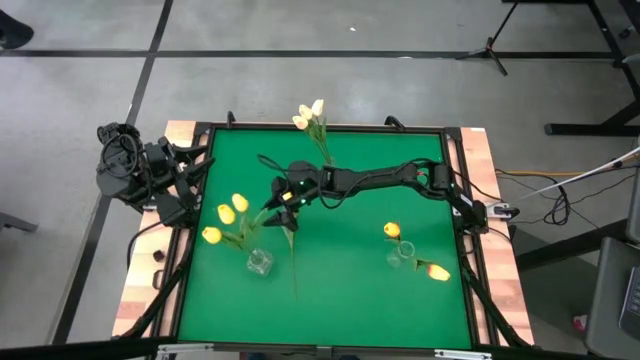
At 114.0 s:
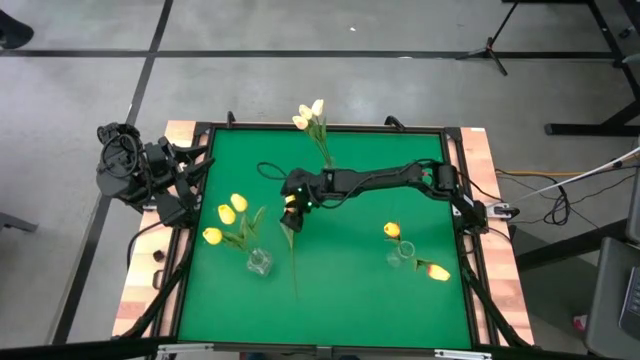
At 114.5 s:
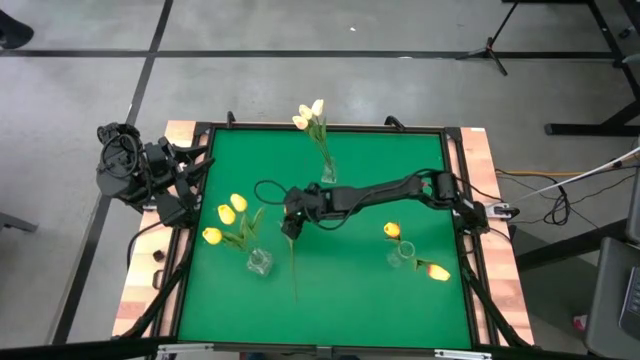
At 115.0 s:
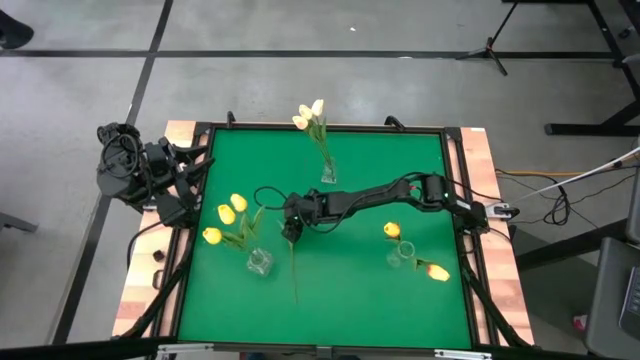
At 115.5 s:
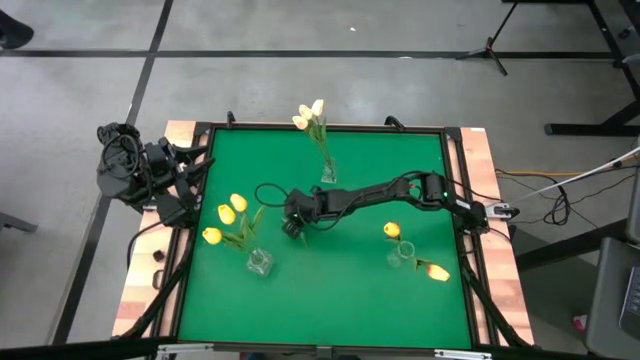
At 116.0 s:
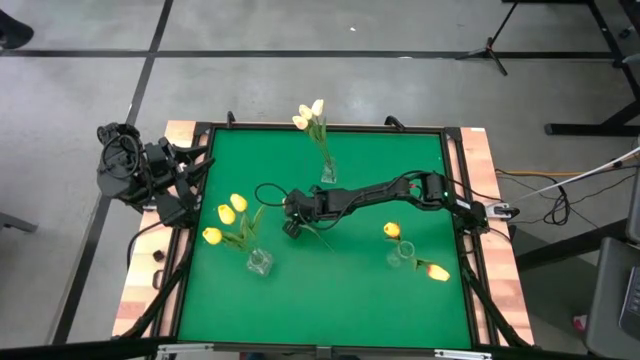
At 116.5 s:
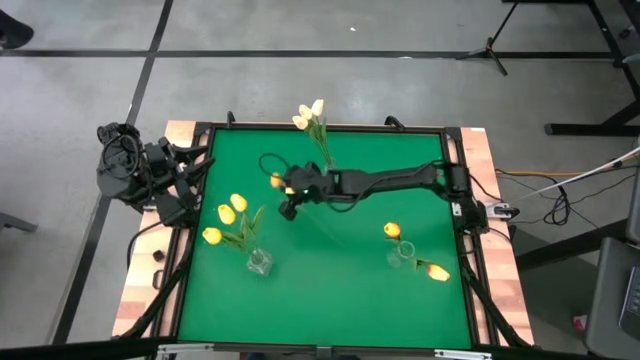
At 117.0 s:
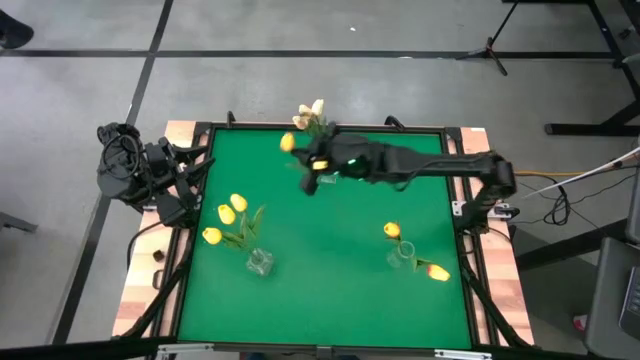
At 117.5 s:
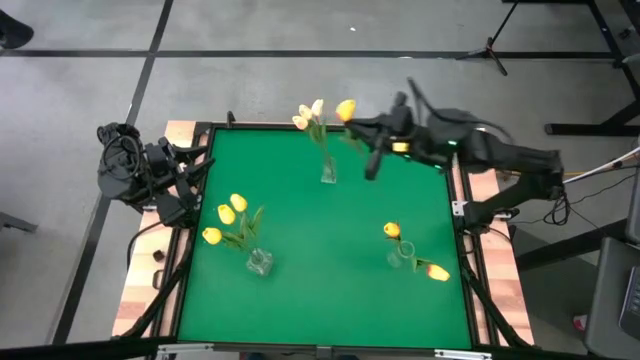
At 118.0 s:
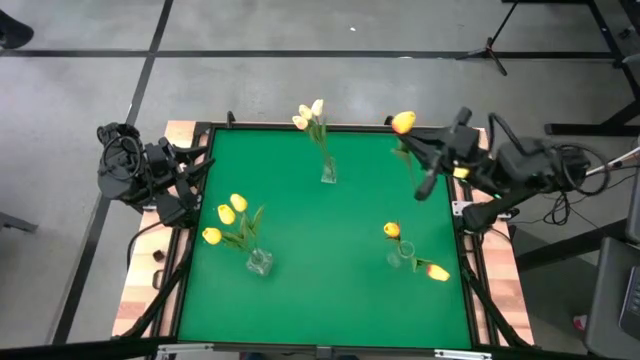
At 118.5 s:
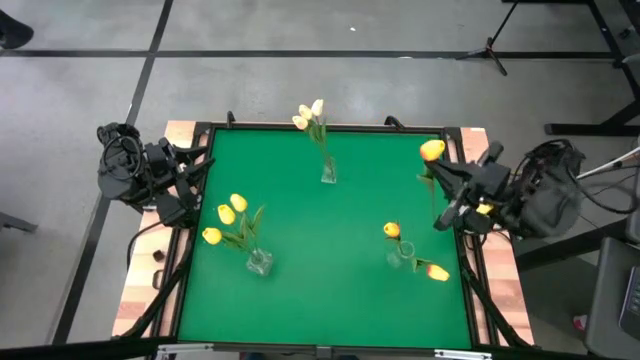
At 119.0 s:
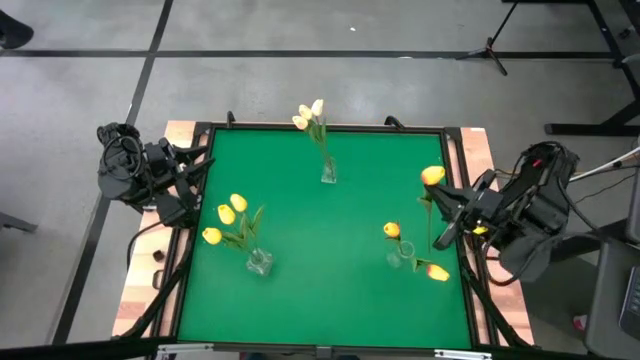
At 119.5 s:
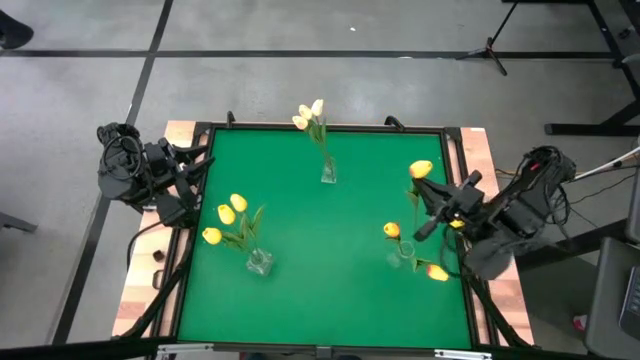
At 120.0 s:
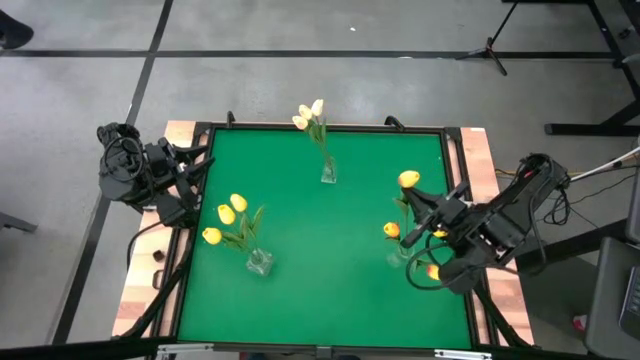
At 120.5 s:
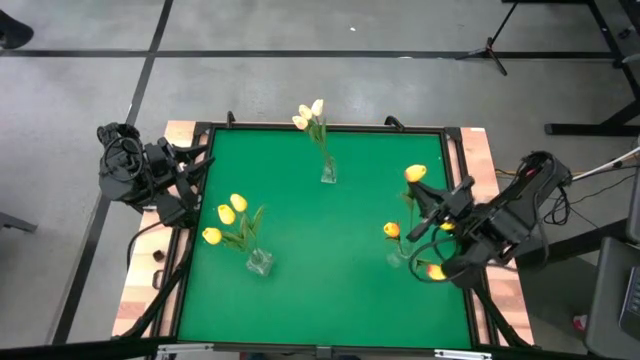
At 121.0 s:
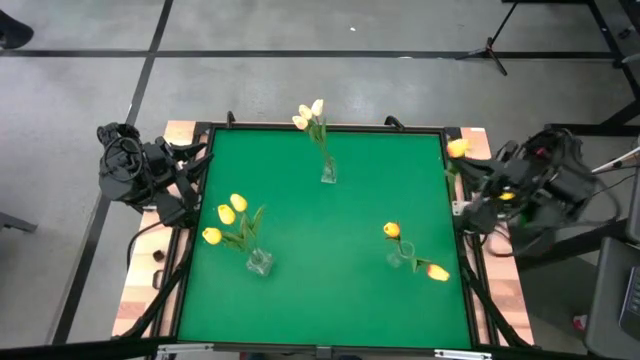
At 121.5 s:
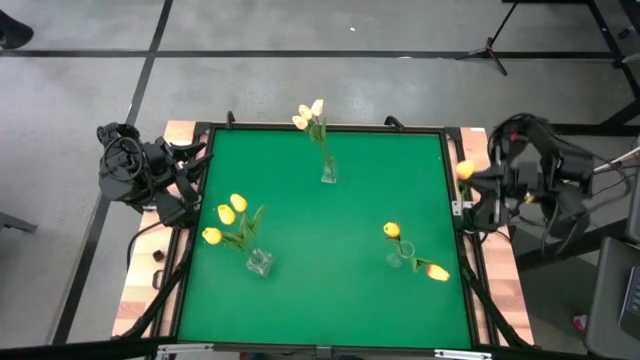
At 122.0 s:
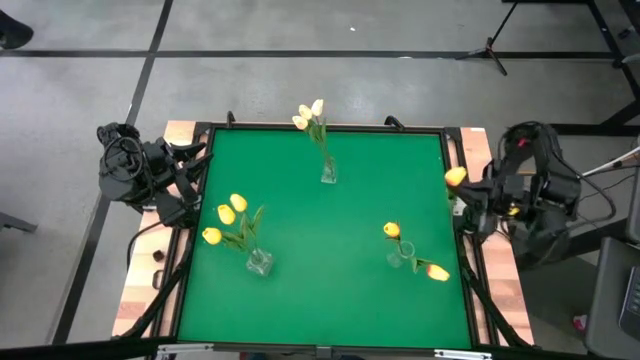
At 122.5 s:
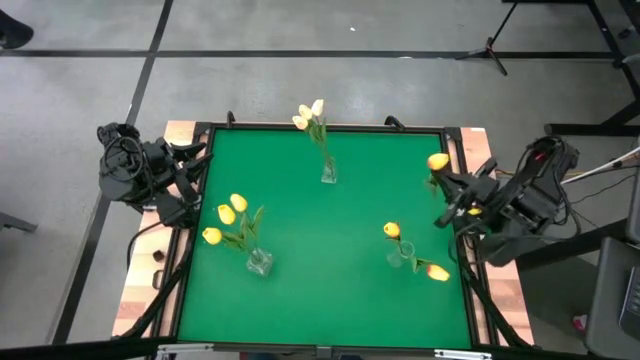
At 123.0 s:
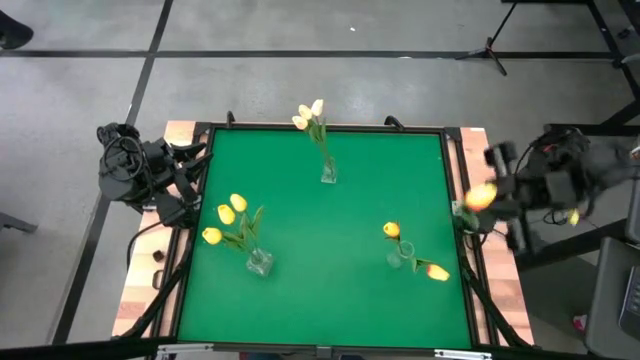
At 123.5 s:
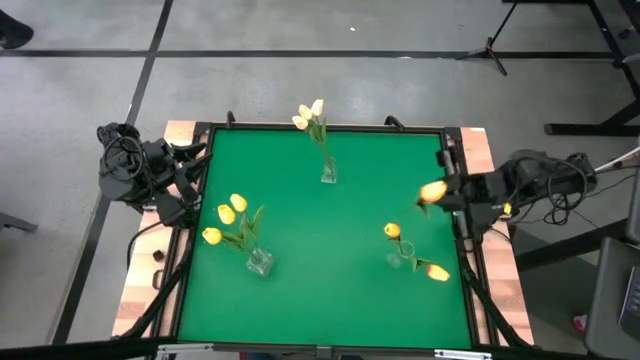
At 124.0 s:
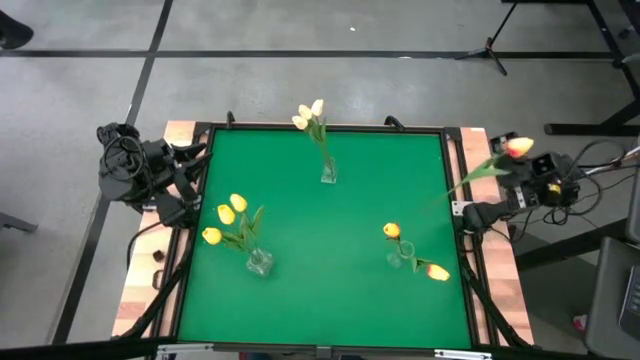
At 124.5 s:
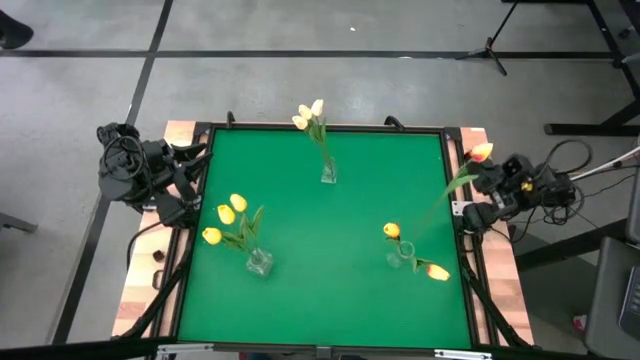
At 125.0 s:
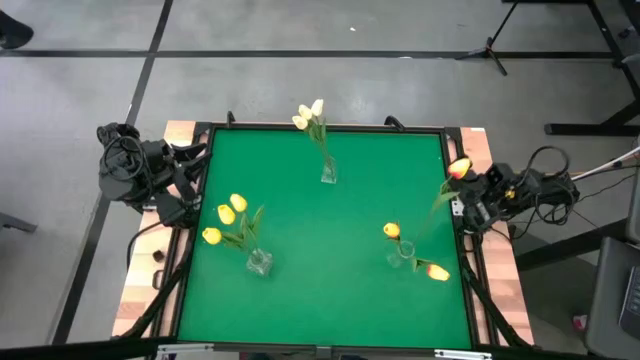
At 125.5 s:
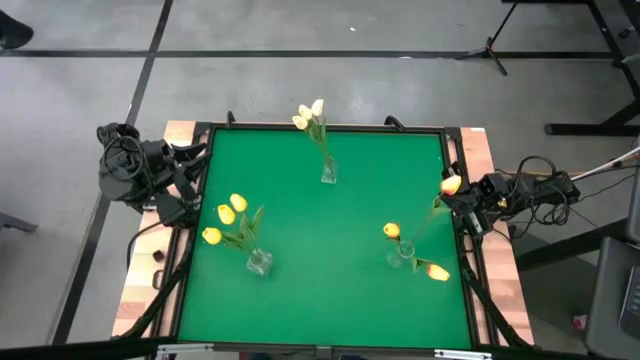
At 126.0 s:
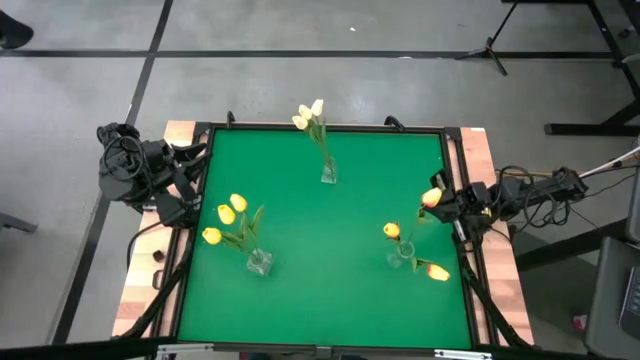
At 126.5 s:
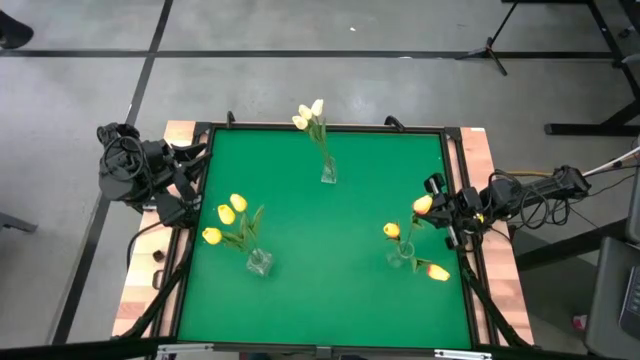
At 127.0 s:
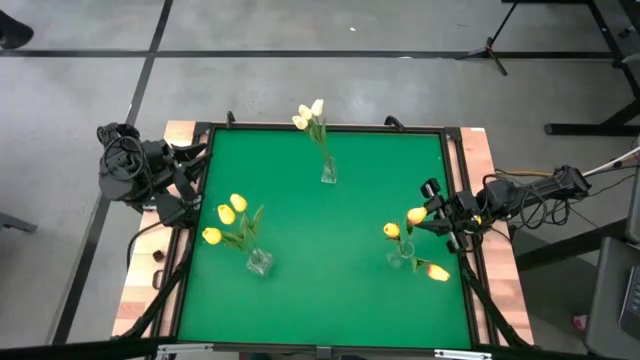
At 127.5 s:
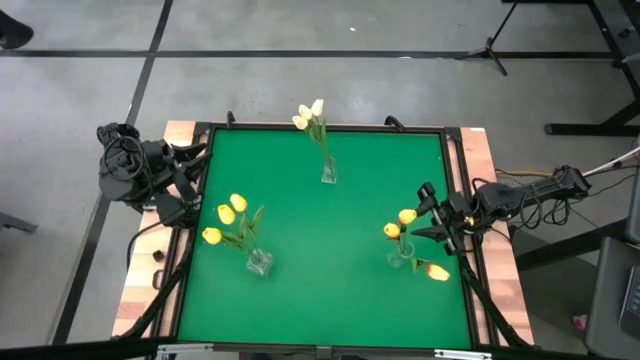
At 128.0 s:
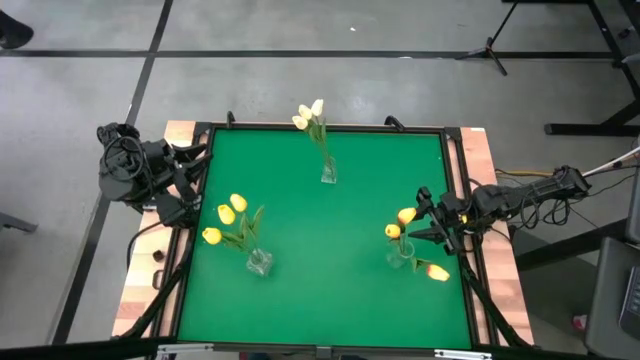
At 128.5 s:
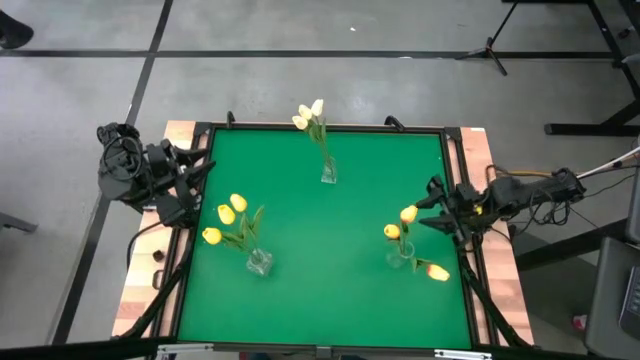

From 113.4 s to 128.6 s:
Task: Sort flowers into vase by color
Put the red-yellow tulip into the bottom right transparent vase

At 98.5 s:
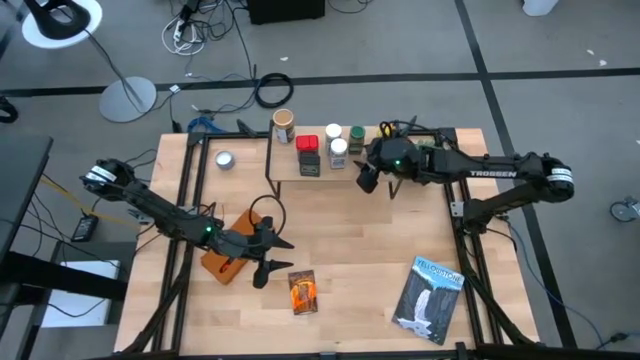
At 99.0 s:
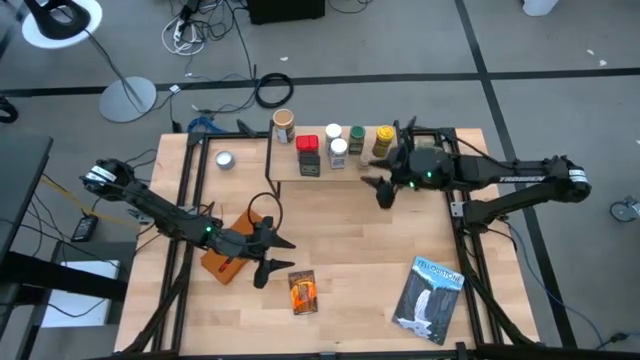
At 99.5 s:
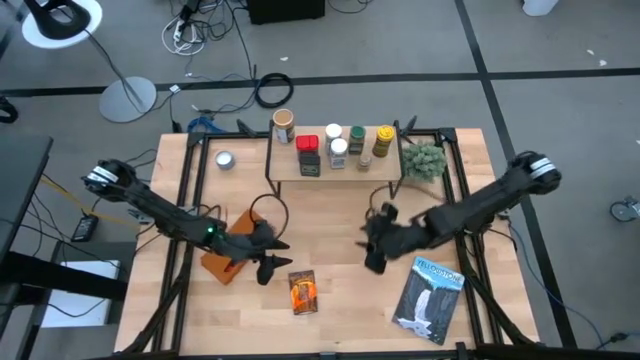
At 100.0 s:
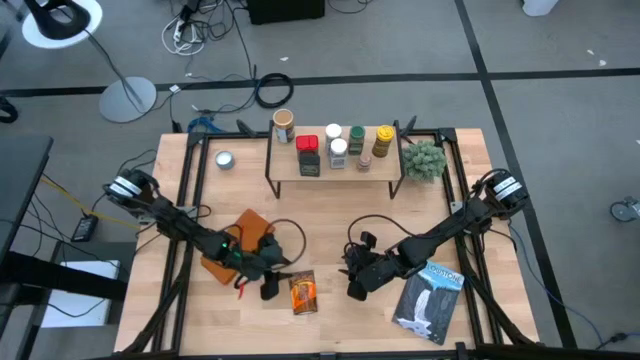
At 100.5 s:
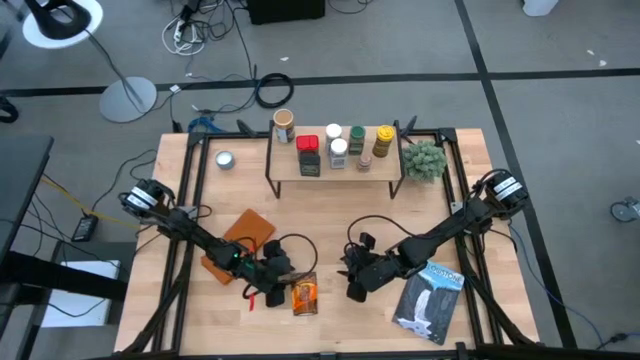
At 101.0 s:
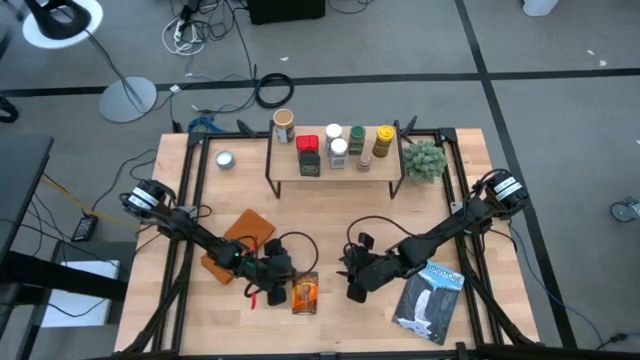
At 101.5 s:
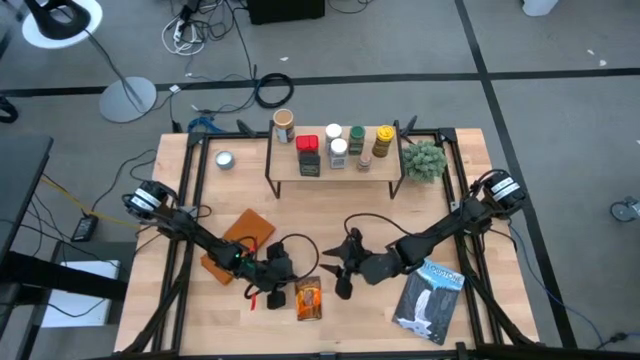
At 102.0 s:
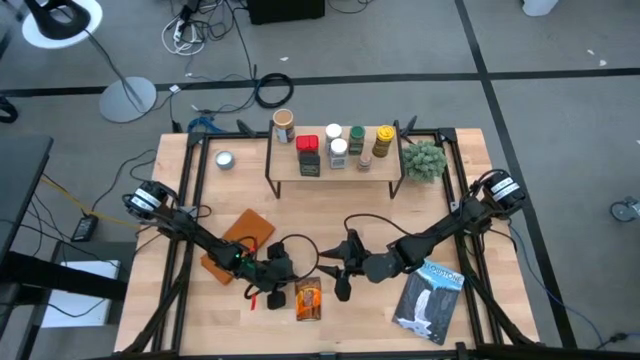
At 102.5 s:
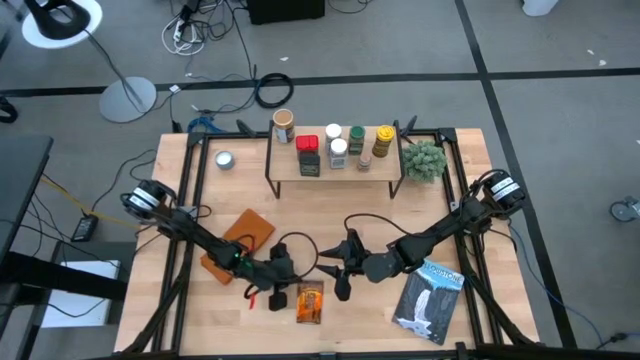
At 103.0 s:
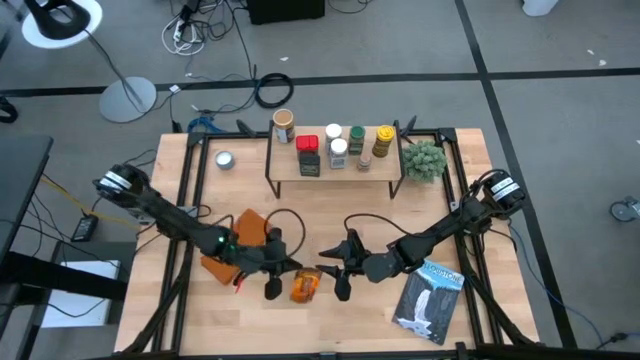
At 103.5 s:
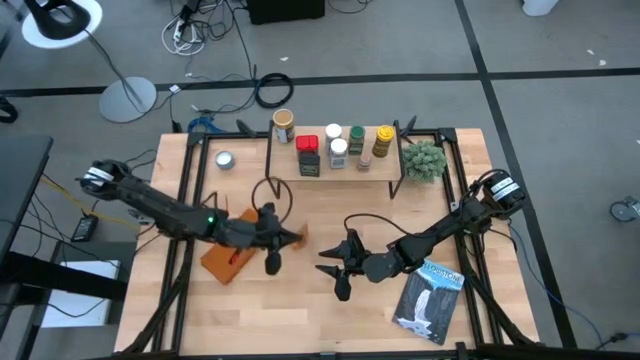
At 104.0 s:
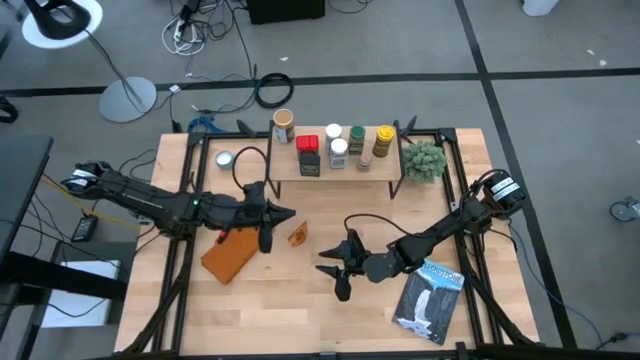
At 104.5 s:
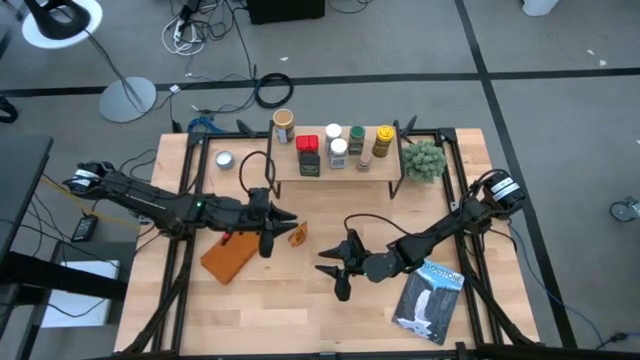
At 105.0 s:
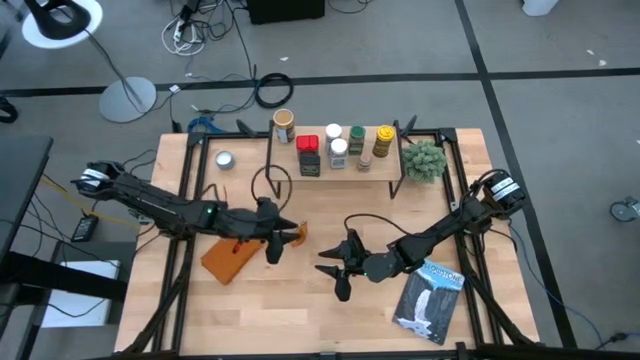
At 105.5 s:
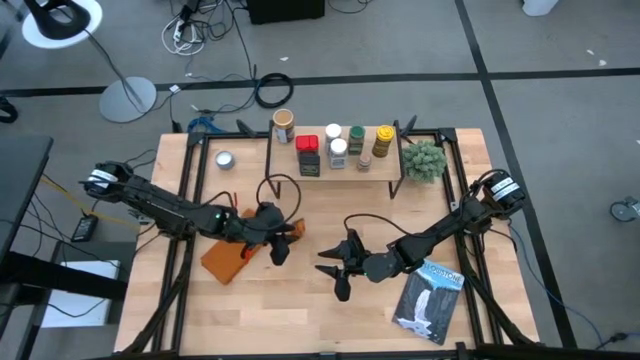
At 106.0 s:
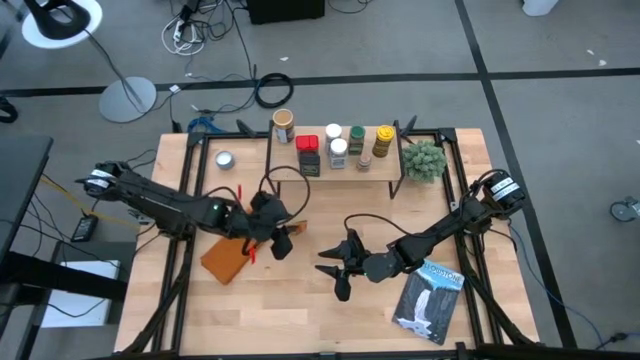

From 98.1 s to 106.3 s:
Task: Shelf spices
Put the brown seasoning bag on the shelf
